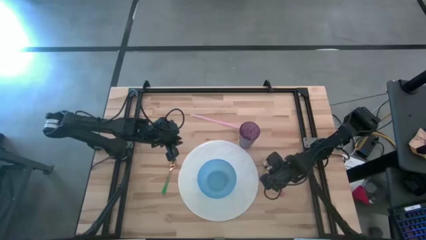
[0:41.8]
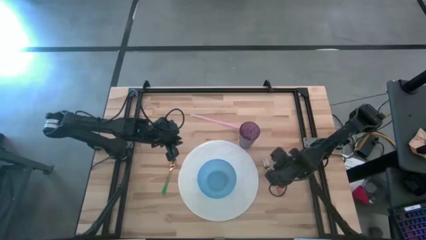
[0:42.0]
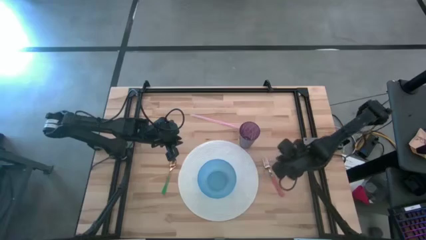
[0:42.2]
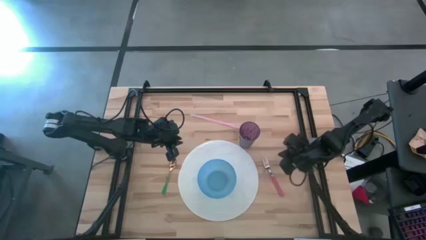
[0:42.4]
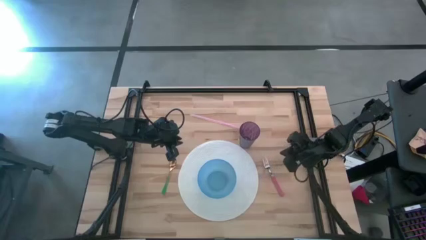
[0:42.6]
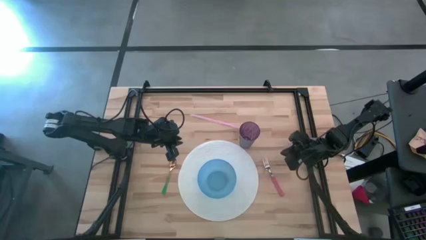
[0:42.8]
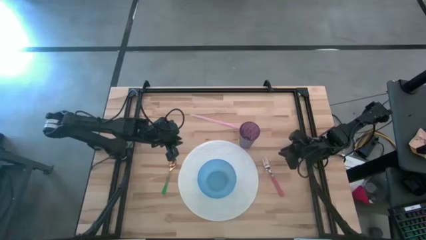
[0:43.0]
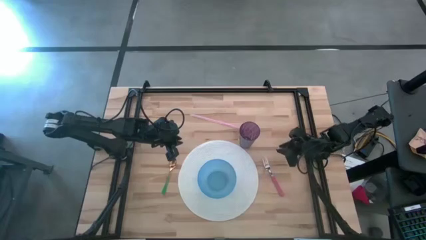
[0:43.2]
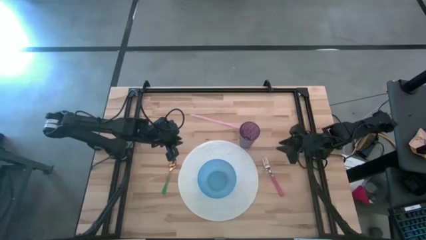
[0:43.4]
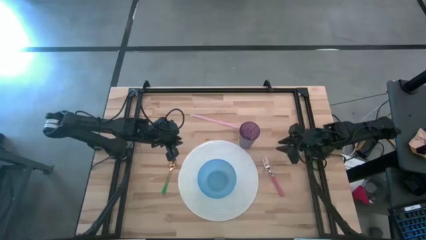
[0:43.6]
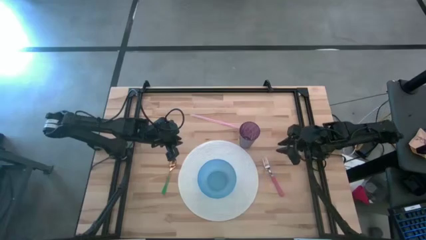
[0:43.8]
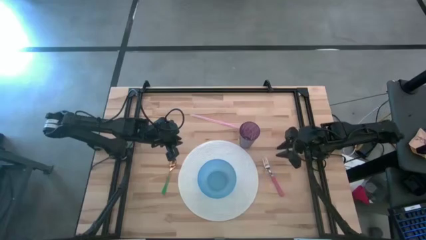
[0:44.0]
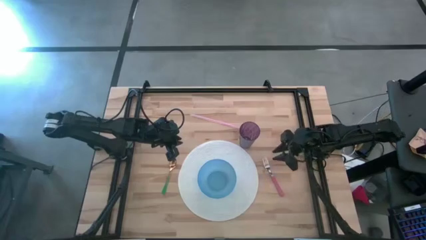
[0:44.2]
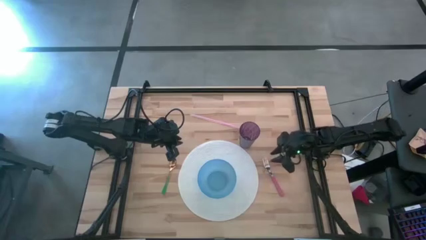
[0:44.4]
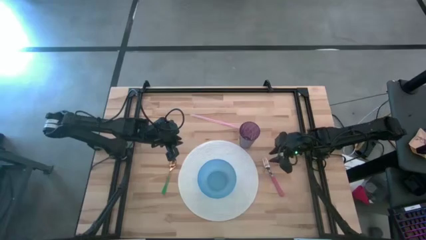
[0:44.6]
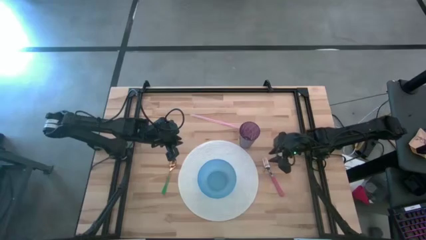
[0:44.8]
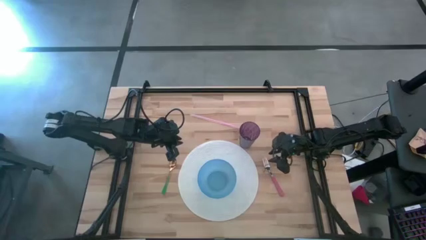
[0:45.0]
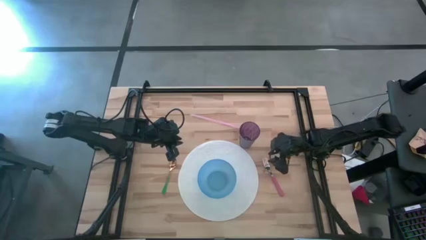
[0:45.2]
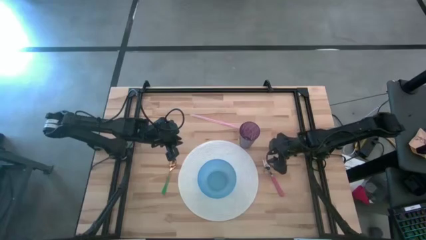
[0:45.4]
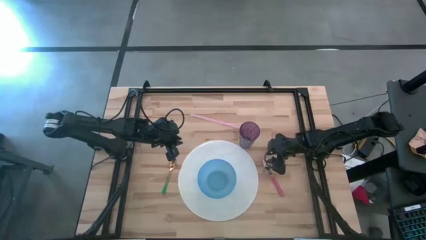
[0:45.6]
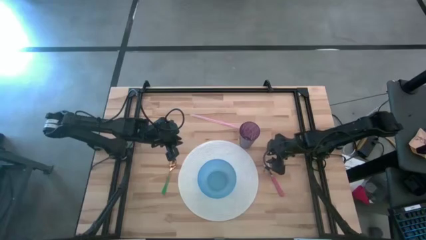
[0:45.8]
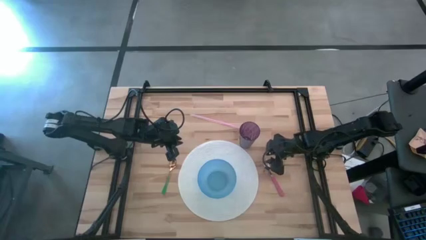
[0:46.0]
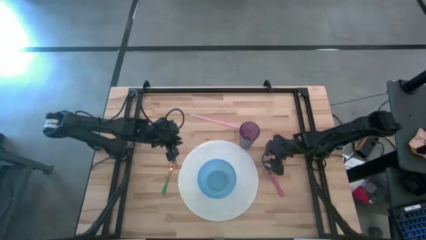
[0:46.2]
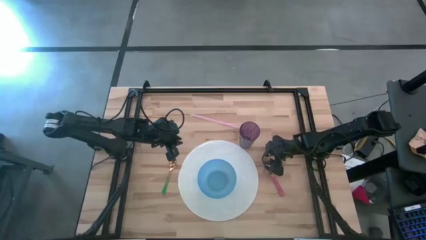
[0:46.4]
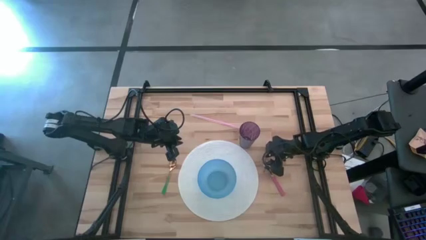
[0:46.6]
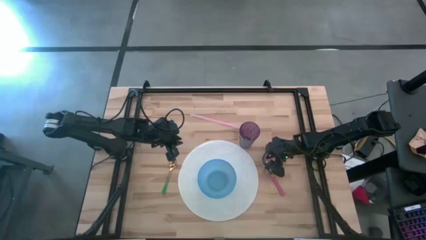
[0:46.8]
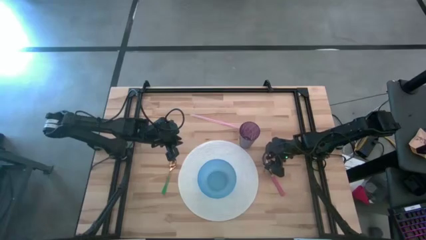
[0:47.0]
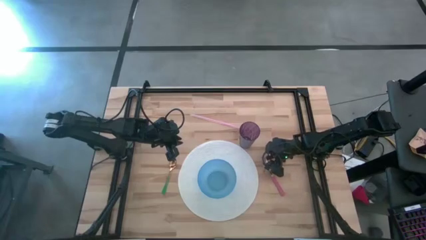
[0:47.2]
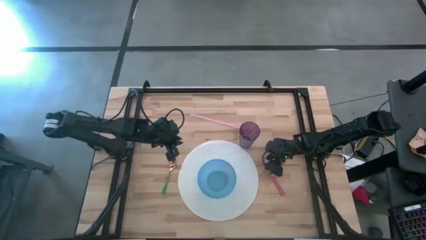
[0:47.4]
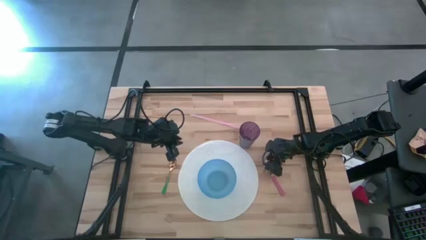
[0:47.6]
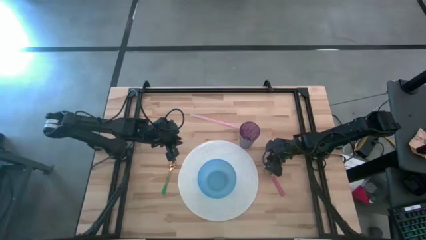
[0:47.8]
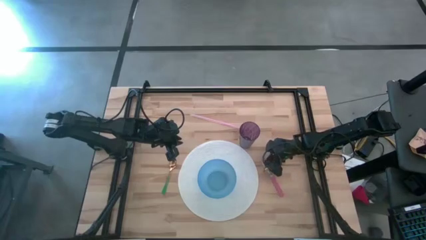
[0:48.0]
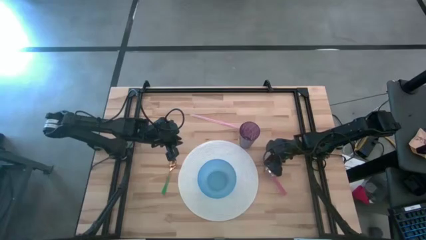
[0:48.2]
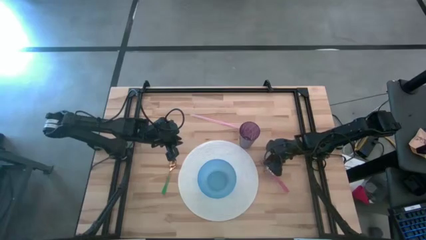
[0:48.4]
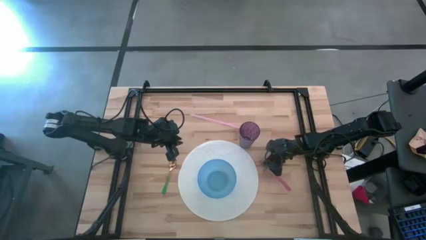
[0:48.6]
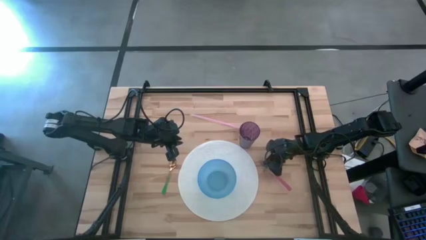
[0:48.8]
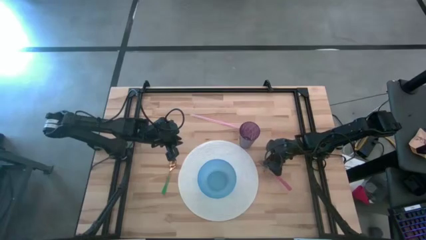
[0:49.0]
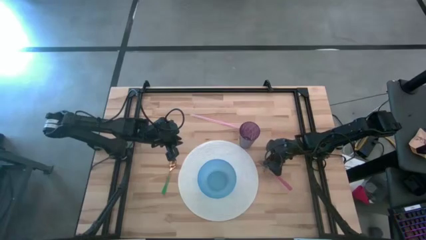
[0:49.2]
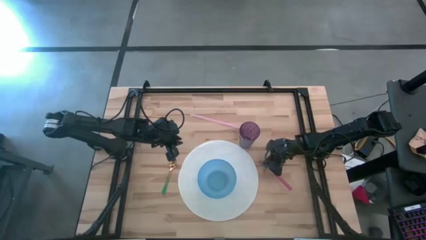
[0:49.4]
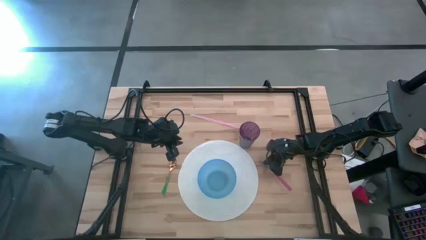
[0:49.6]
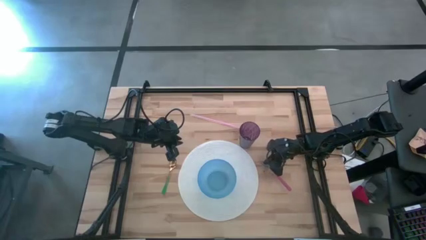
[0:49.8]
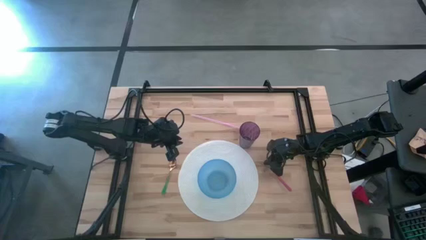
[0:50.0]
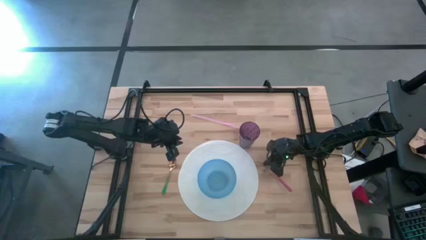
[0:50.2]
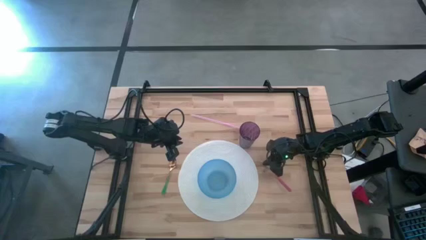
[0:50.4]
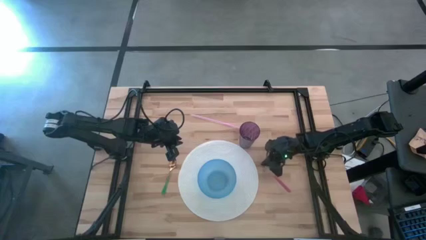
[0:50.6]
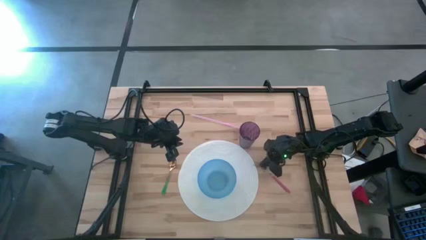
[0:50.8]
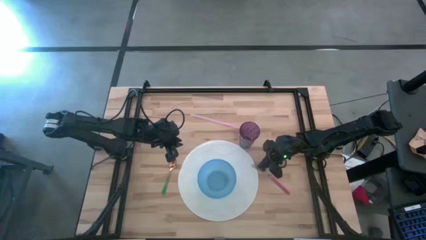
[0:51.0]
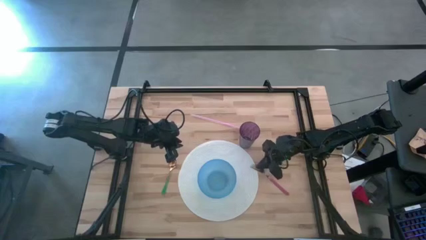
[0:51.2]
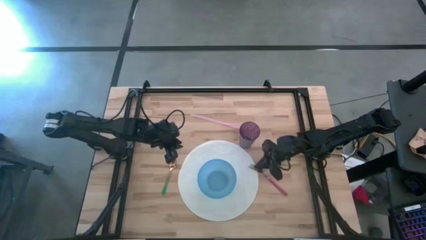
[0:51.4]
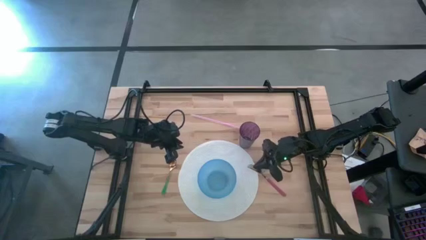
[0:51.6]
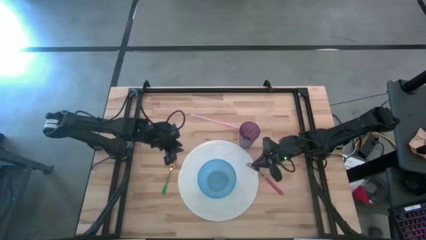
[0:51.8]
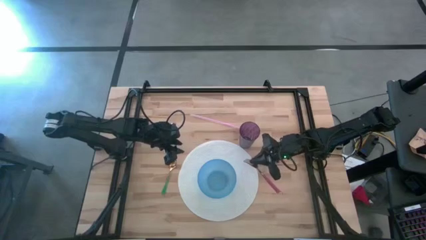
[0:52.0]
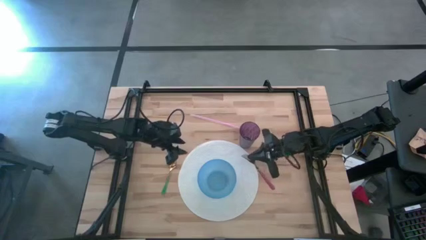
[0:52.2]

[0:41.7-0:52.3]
Task: Pick & Place Utensil
Put the pink fork in the blue bowl

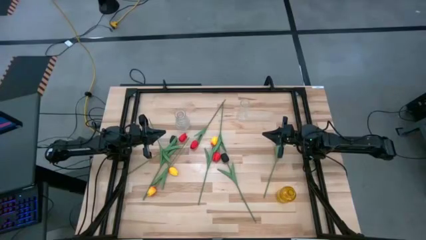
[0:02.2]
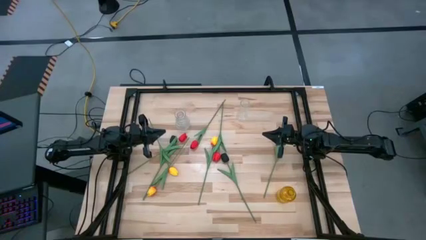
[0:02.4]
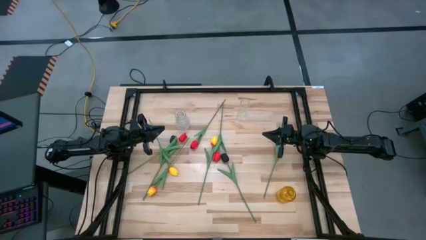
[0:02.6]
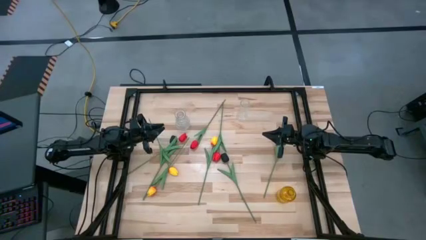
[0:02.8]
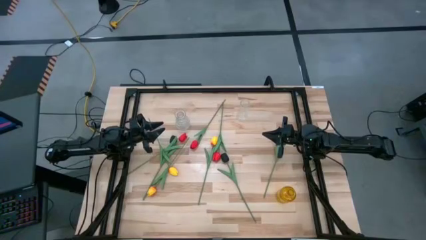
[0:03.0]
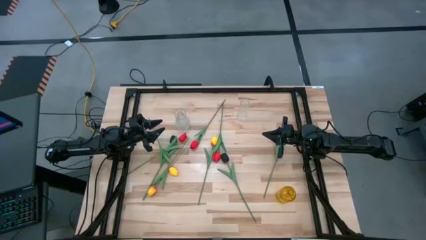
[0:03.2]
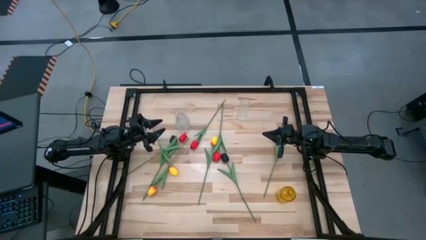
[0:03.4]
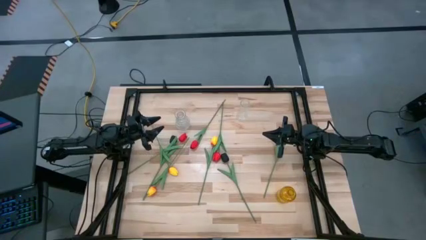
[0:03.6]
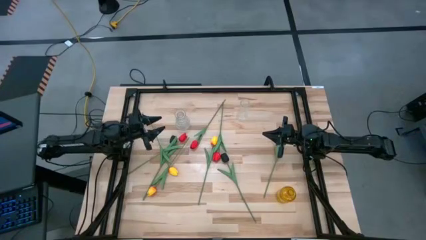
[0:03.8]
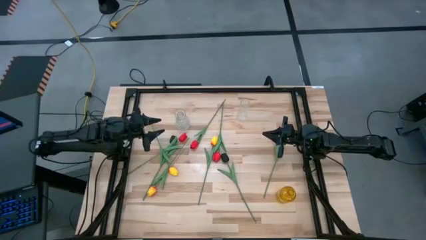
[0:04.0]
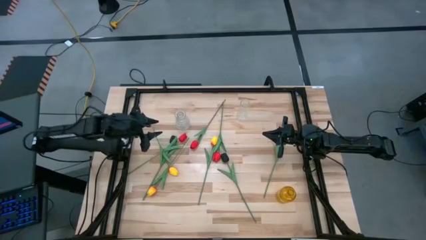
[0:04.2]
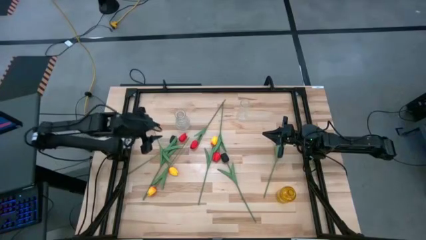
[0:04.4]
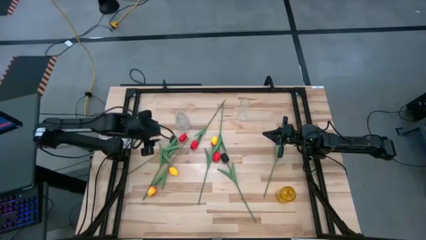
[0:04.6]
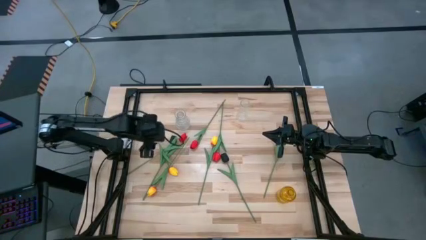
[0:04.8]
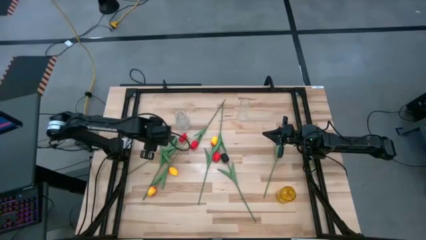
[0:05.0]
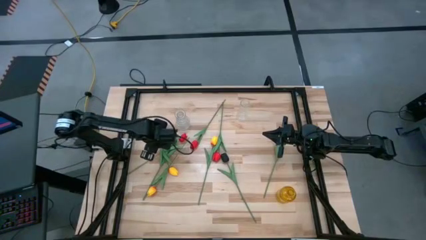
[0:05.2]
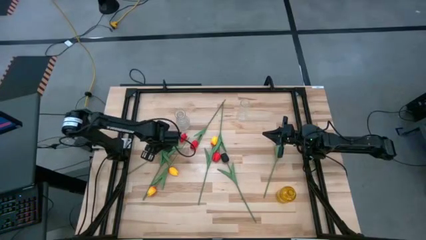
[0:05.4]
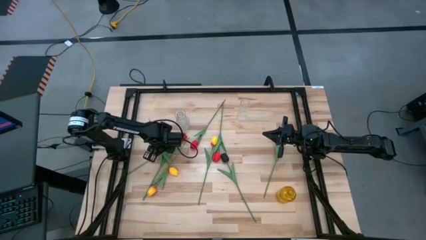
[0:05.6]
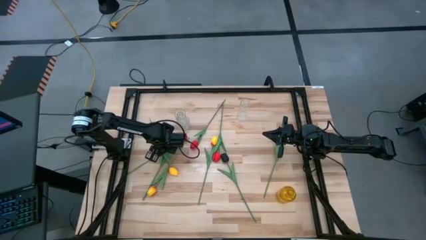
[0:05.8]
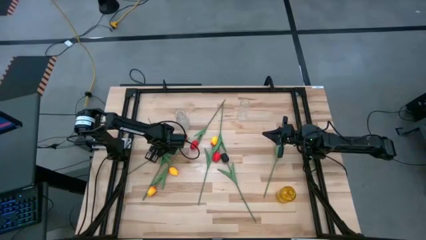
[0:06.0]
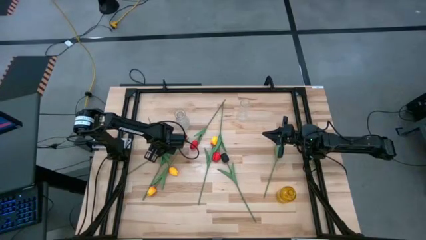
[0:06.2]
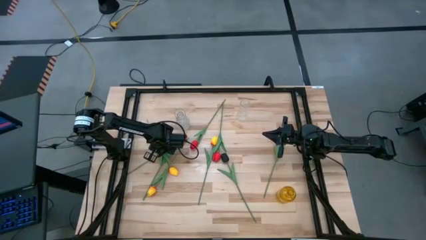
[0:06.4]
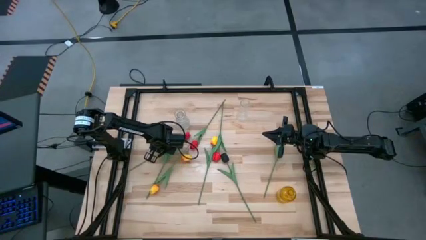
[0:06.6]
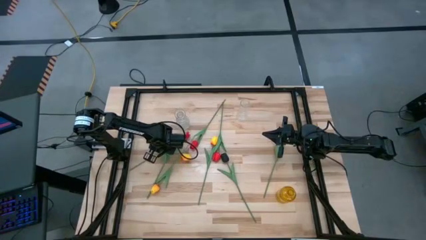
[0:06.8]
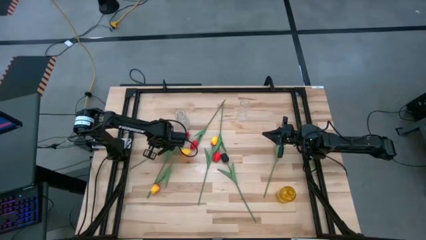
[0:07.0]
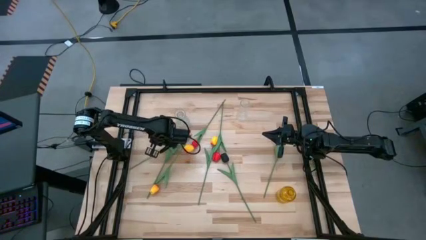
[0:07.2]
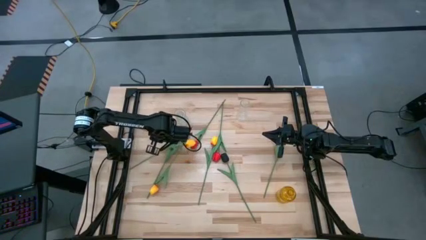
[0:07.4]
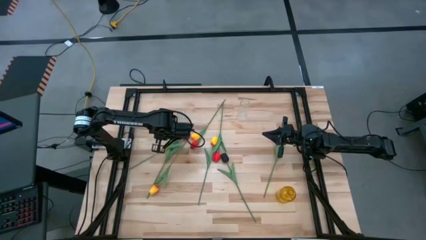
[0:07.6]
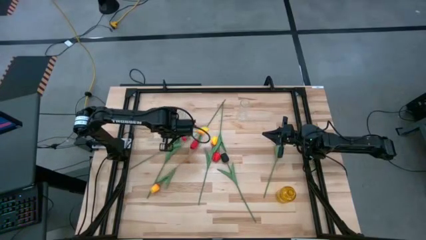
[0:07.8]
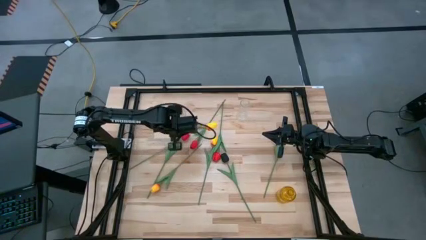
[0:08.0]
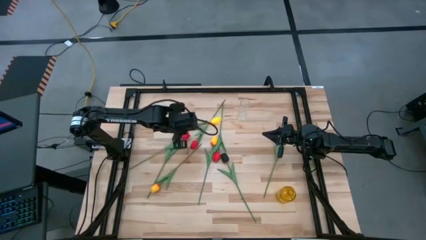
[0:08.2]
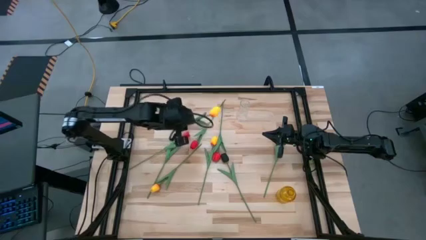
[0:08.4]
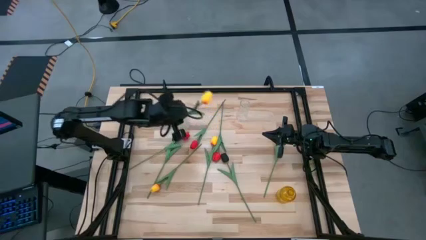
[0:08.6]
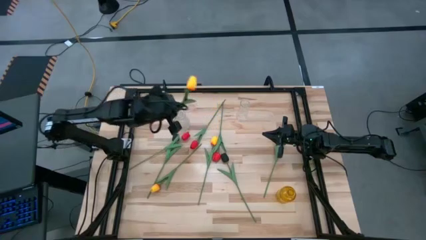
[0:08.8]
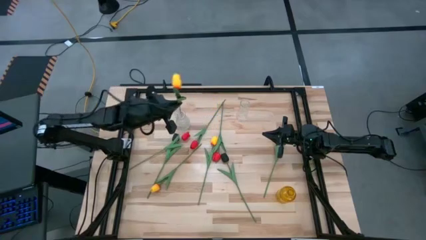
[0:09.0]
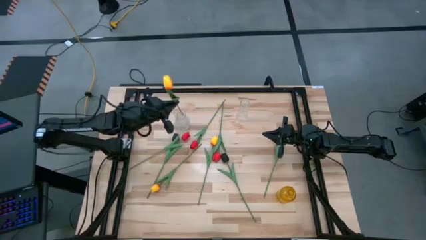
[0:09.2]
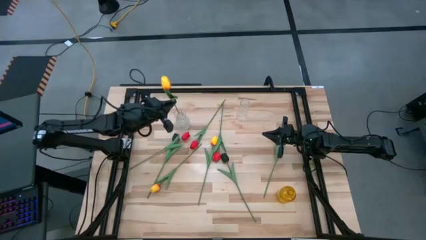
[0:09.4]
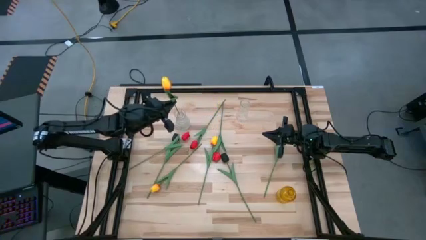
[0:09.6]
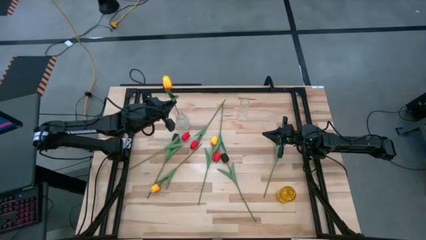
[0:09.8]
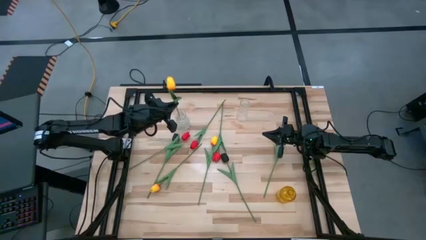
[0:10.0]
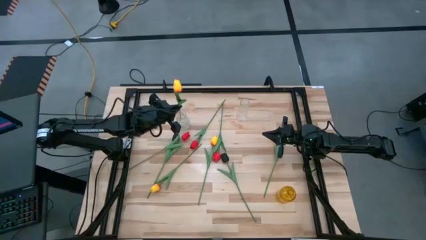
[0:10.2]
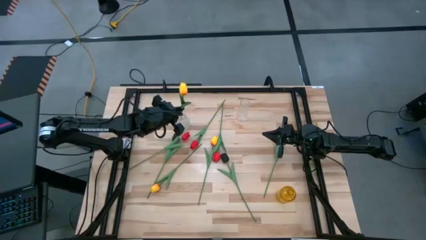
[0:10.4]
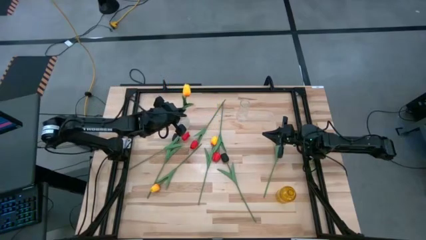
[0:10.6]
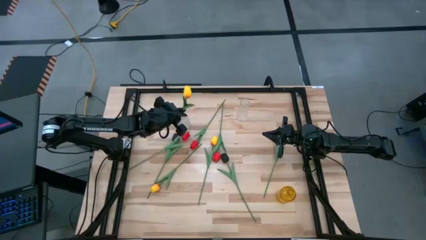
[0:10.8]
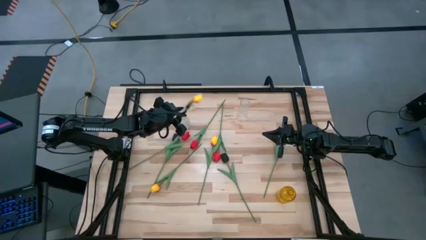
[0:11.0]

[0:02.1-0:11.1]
Task: Sort flowers into vase by color
Put the left yellow tulip into the left transparent vase
